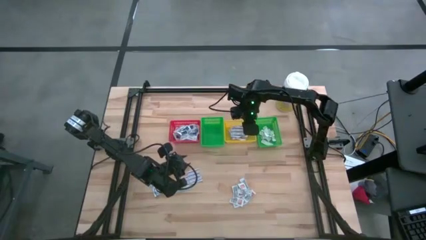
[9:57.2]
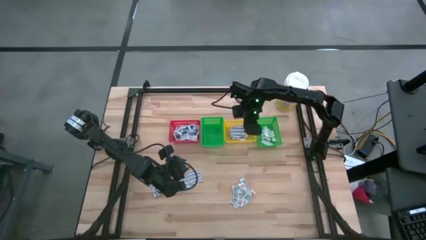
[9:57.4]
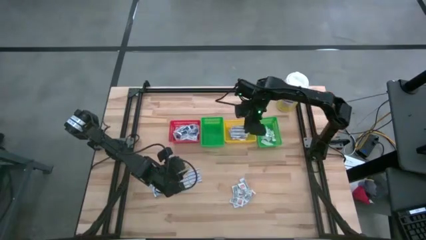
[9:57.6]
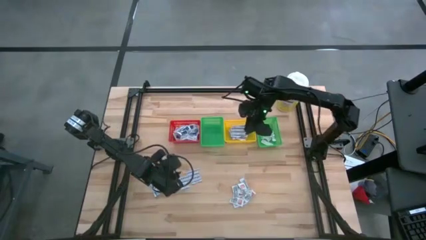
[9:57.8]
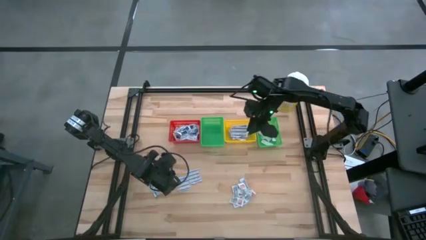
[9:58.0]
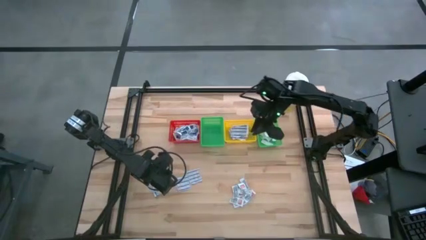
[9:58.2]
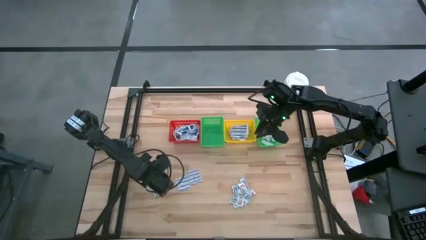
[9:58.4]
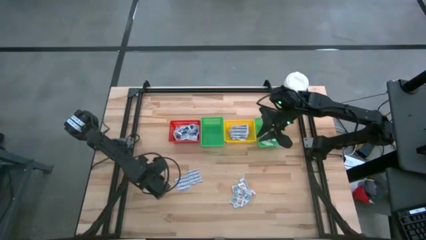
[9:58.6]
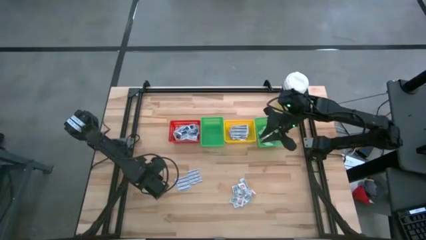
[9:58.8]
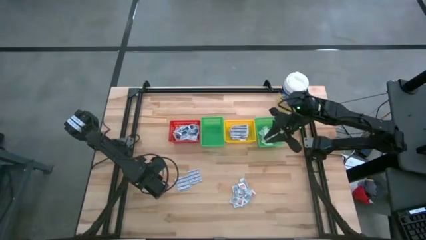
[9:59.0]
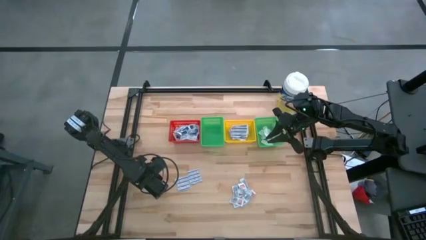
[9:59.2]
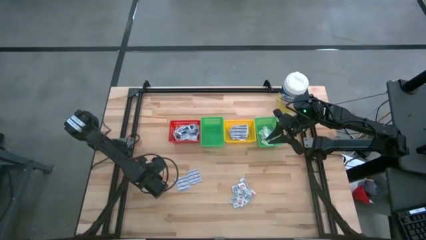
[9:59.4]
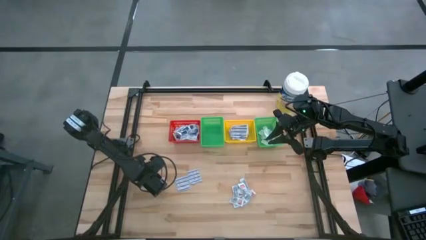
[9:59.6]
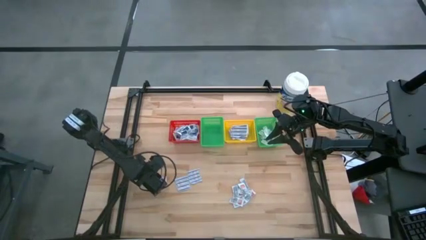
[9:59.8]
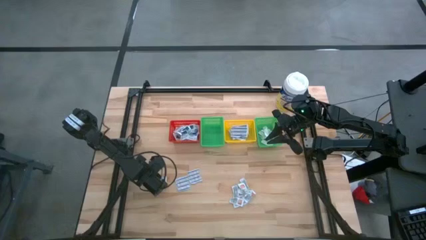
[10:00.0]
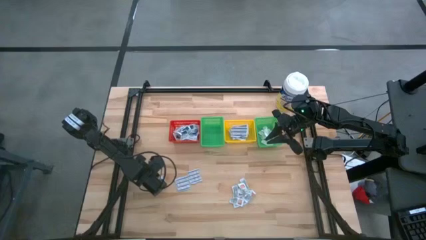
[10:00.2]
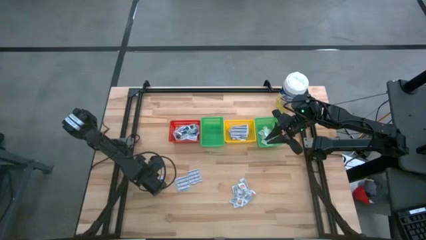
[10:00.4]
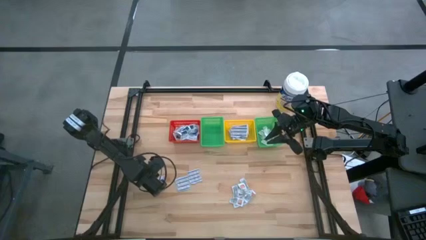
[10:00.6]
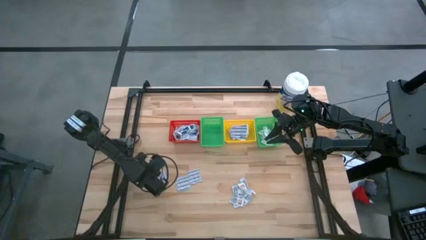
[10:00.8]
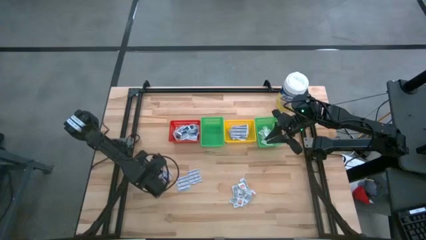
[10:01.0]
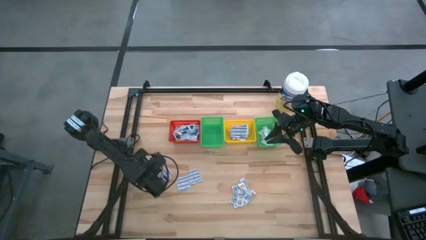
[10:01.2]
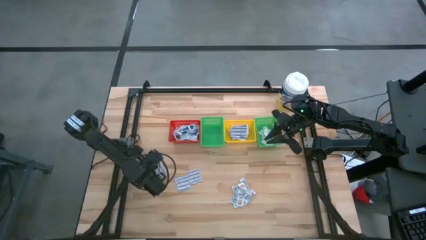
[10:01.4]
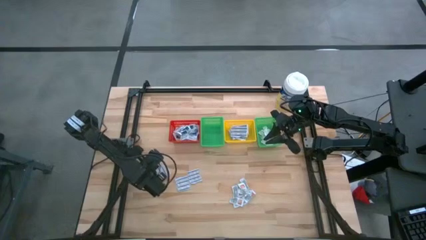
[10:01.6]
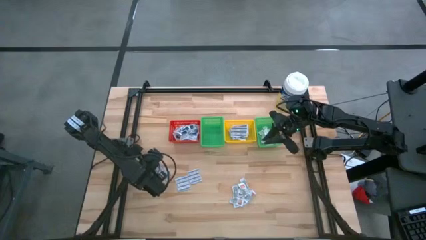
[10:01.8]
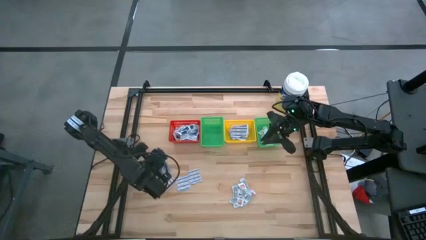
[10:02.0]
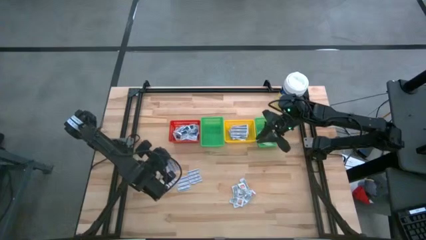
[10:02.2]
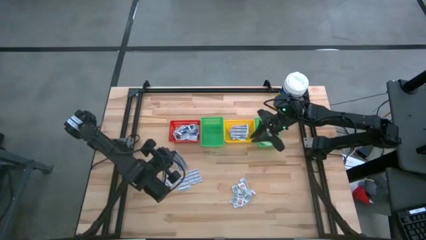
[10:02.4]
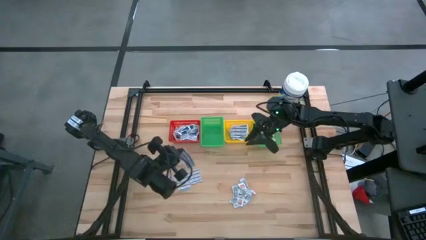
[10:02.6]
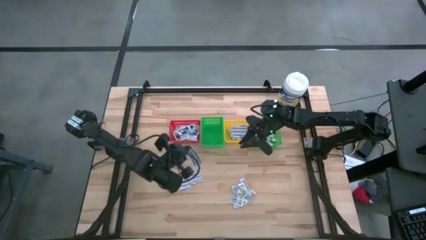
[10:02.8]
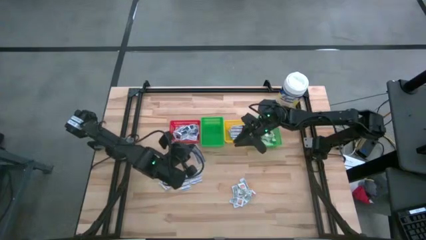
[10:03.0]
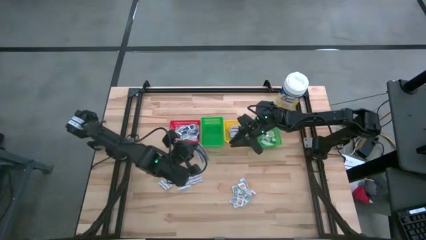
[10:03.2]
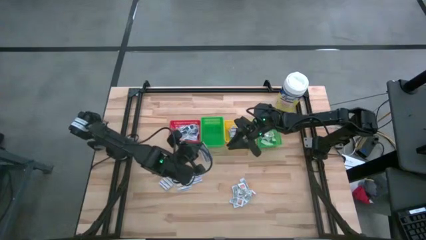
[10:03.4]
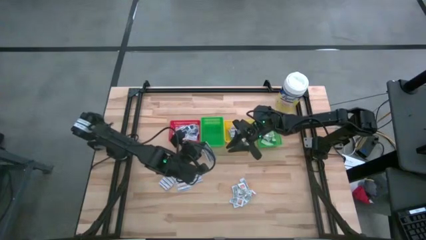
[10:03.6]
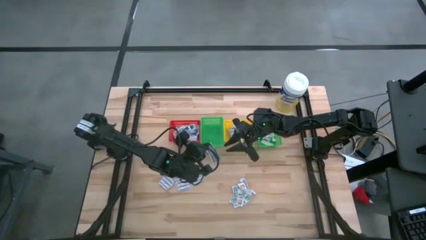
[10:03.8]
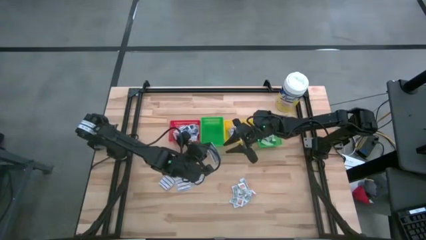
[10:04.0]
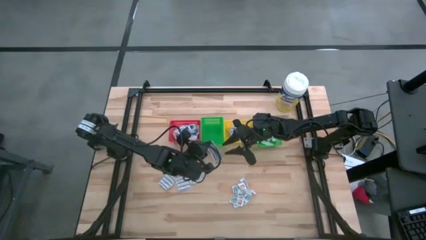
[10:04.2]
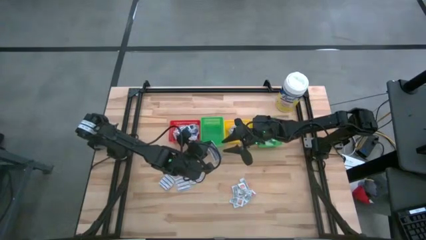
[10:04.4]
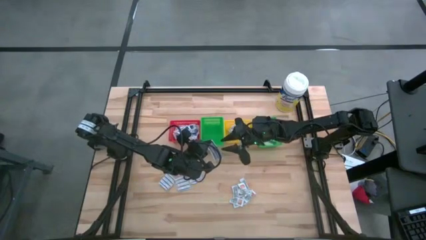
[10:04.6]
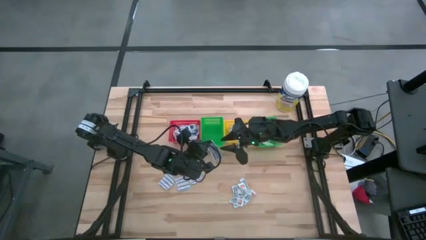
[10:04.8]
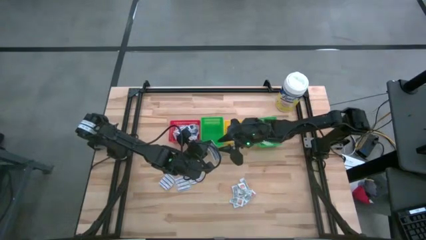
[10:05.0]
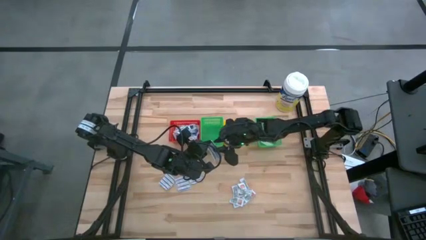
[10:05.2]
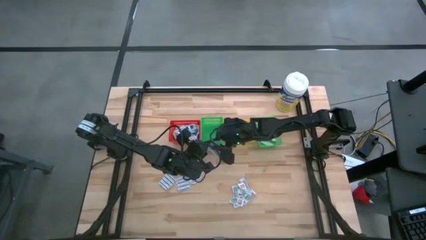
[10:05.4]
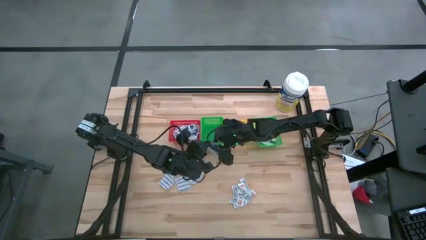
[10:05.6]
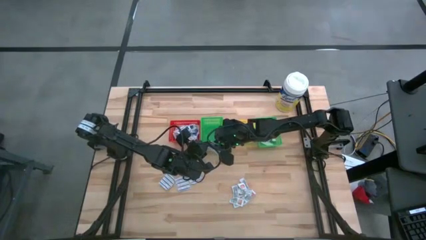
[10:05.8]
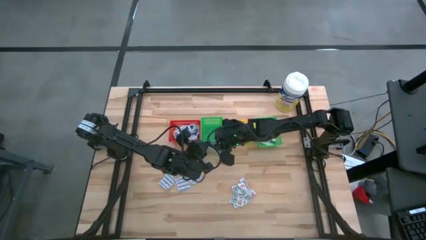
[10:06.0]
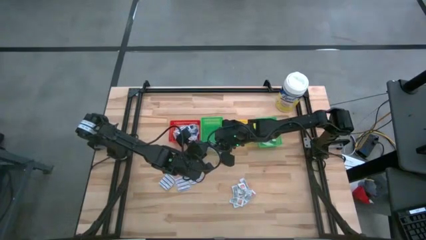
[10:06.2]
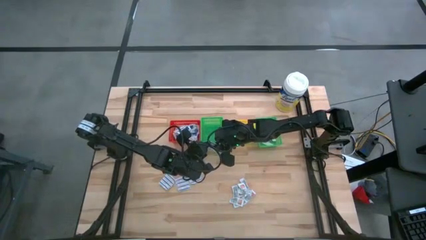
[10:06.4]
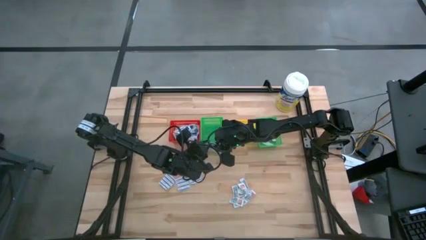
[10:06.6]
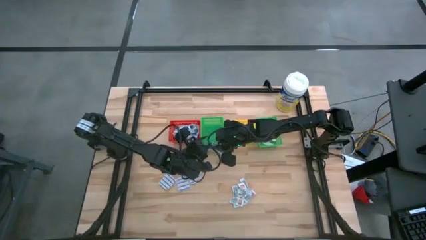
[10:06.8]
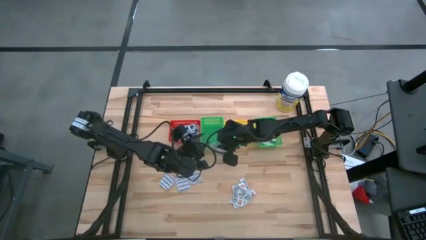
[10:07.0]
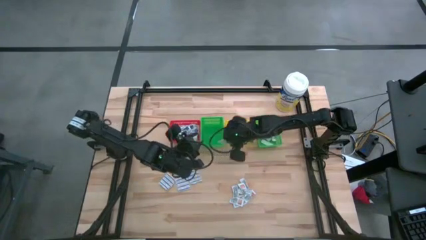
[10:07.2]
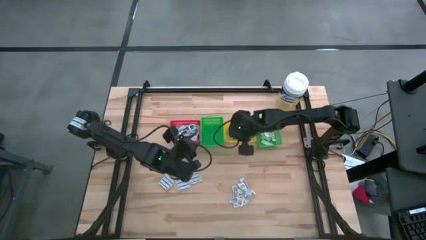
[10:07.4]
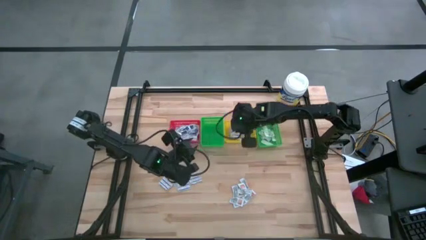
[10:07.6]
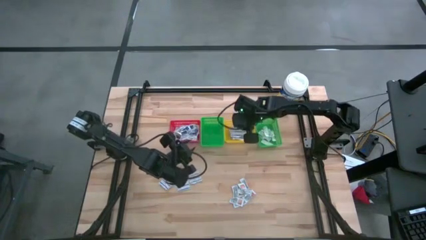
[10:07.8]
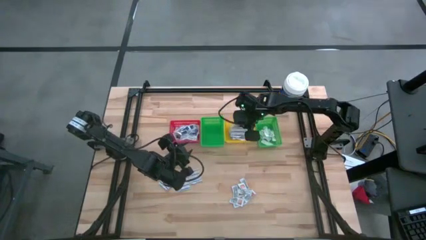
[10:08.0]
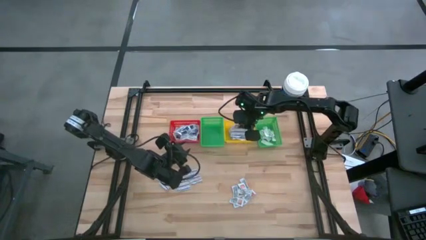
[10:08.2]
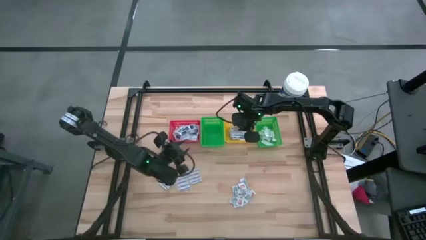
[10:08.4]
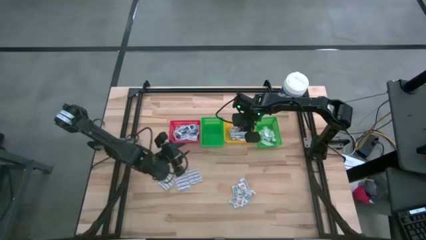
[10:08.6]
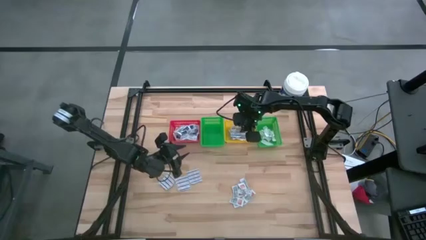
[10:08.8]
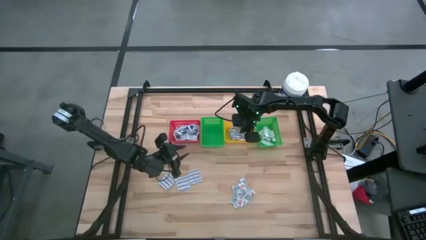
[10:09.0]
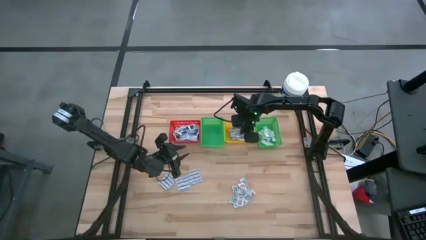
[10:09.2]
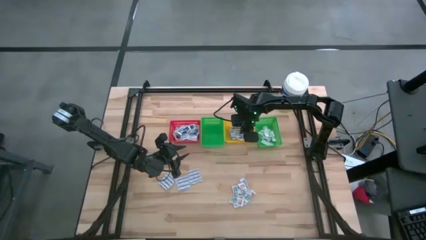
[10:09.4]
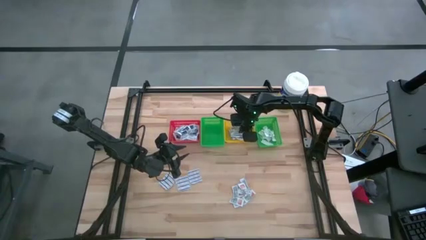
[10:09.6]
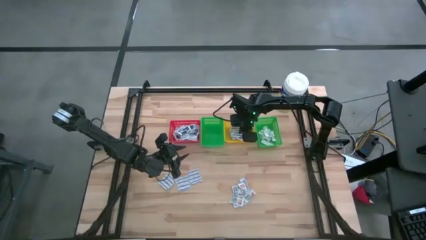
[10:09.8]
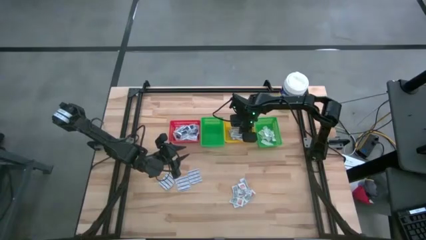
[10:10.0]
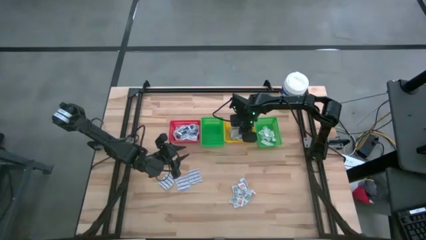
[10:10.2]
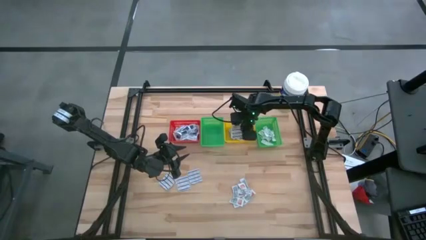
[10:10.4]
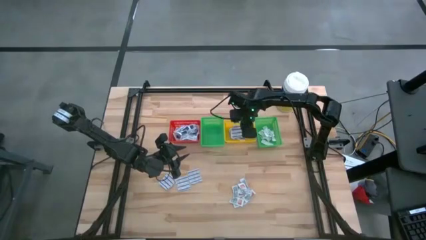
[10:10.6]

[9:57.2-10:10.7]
Task: Pick & Place First Aid Supplies
Put the blue bandage into the yellow basket

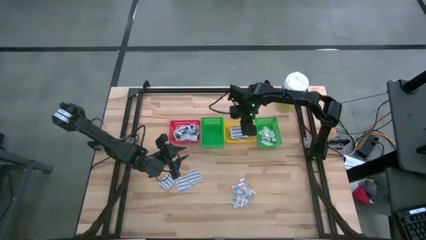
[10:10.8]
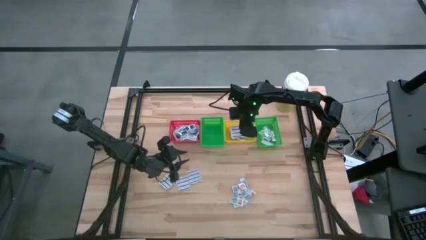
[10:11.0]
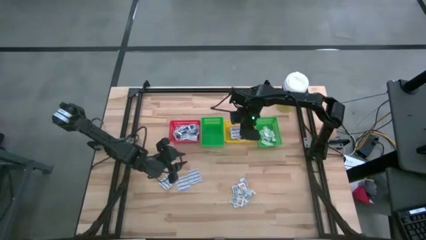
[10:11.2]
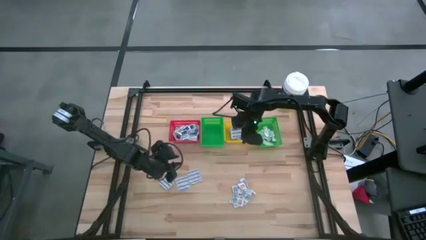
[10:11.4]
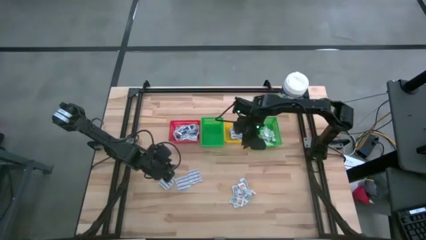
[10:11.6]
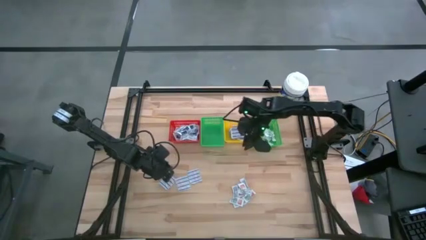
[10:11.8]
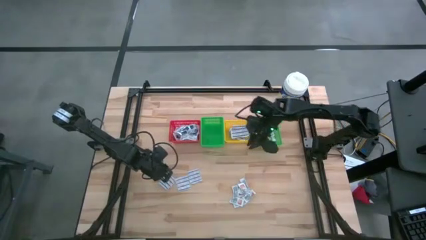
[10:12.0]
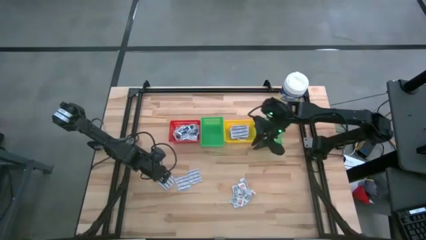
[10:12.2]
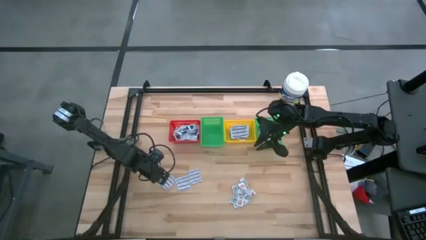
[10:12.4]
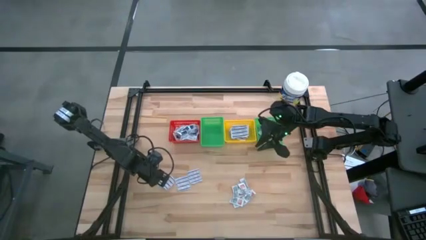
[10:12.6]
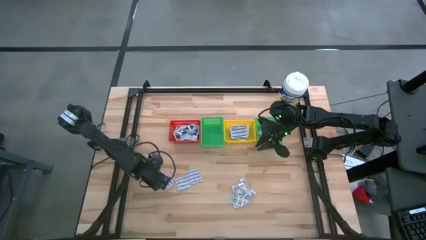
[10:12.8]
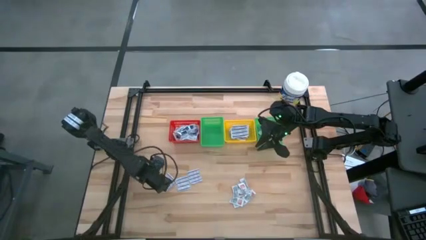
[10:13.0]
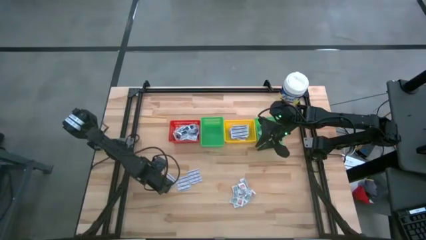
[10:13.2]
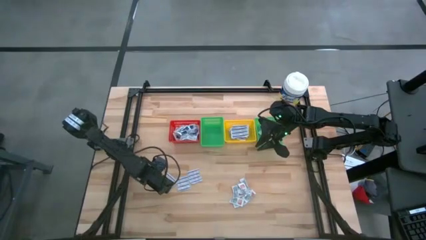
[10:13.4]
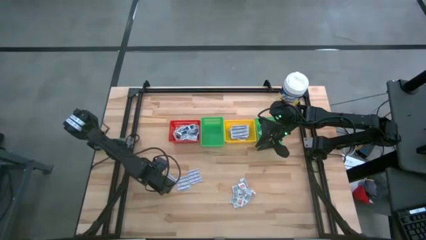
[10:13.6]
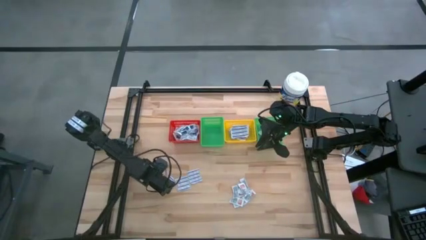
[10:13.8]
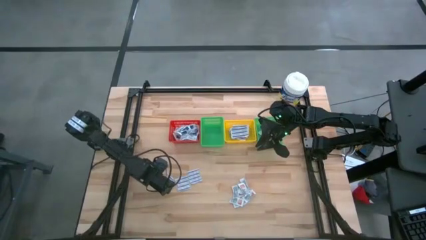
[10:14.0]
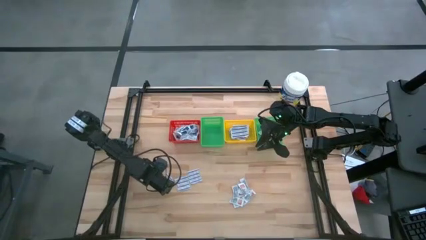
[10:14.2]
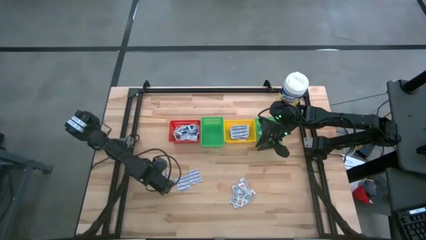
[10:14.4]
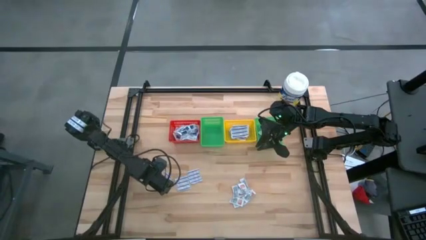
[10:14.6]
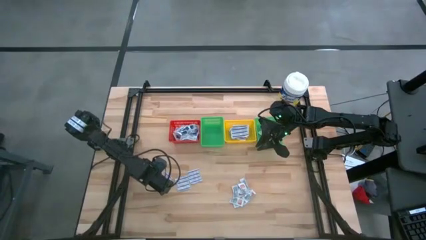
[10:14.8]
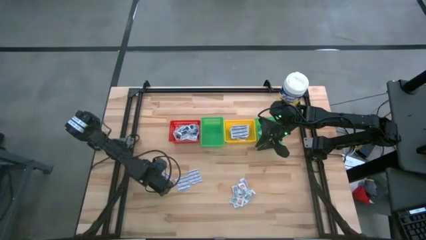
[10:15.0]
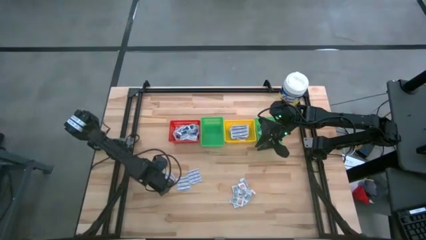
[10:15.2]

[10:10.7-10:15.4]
Put the blue bandage into the yellow basket
